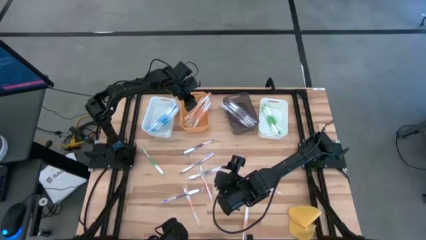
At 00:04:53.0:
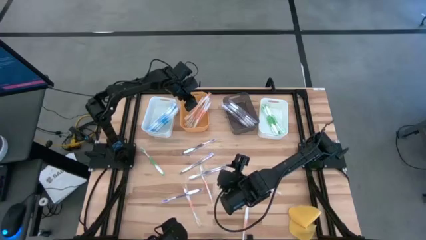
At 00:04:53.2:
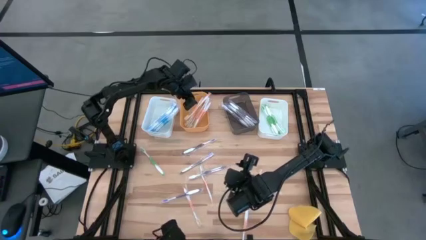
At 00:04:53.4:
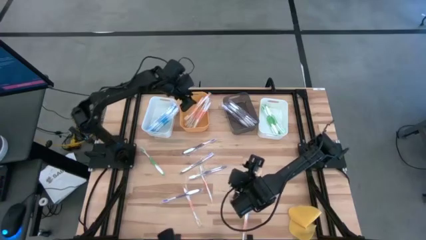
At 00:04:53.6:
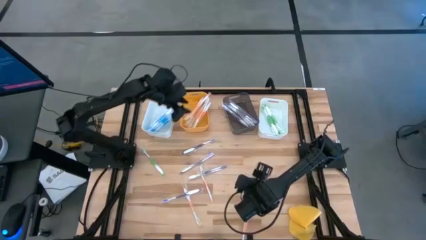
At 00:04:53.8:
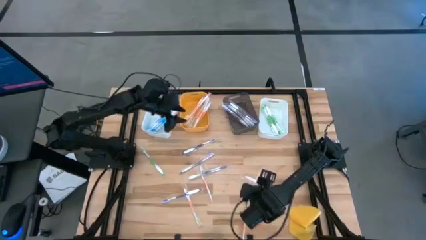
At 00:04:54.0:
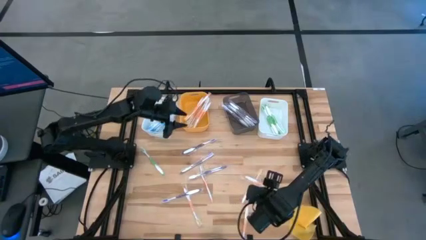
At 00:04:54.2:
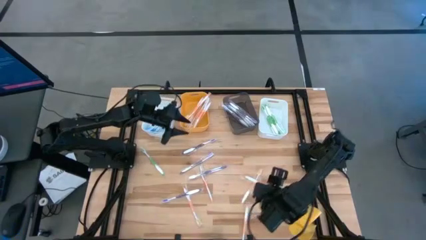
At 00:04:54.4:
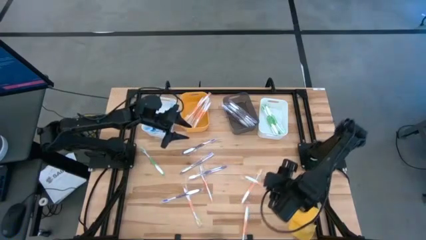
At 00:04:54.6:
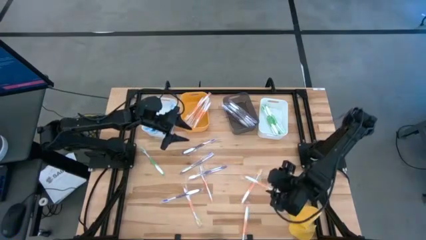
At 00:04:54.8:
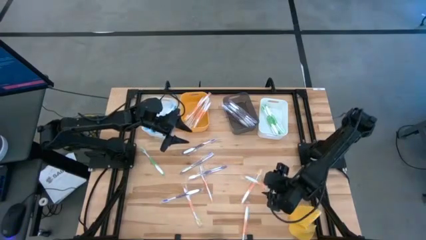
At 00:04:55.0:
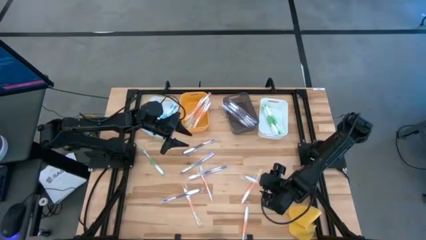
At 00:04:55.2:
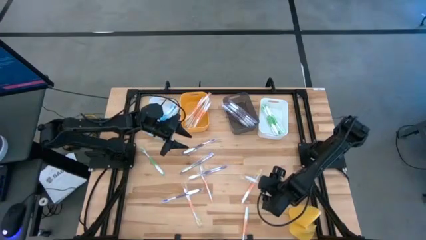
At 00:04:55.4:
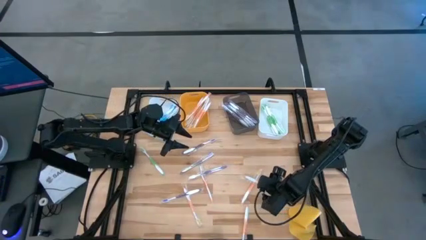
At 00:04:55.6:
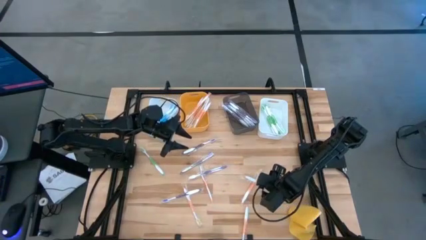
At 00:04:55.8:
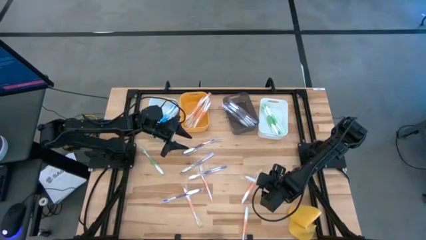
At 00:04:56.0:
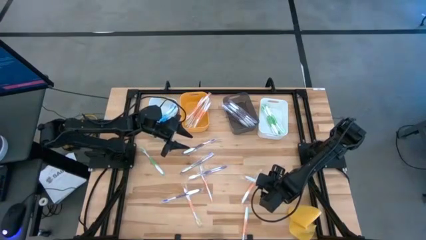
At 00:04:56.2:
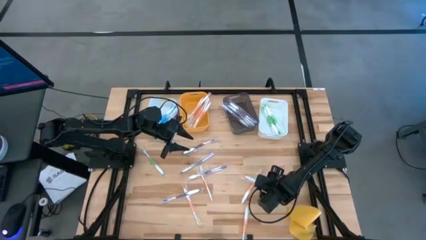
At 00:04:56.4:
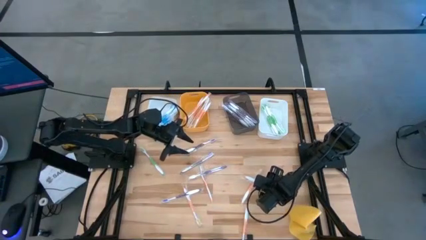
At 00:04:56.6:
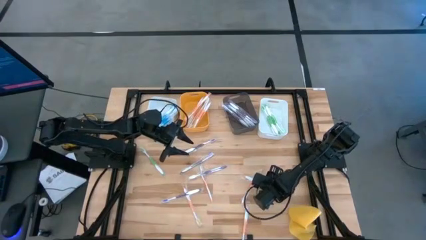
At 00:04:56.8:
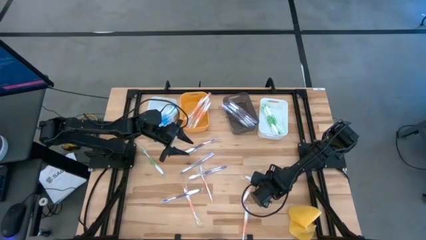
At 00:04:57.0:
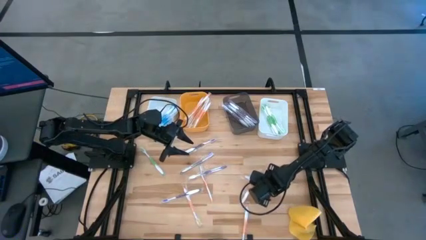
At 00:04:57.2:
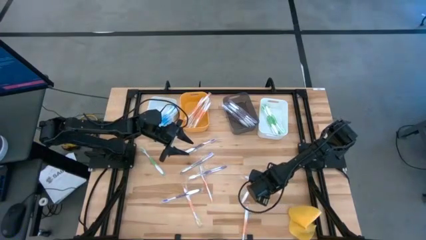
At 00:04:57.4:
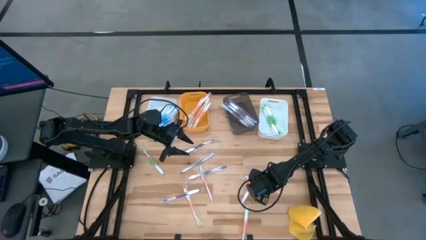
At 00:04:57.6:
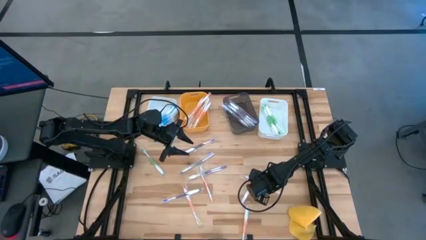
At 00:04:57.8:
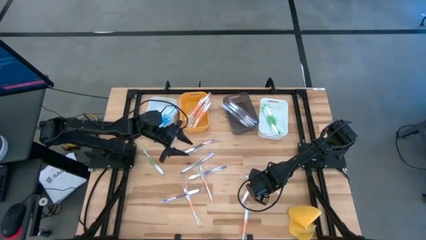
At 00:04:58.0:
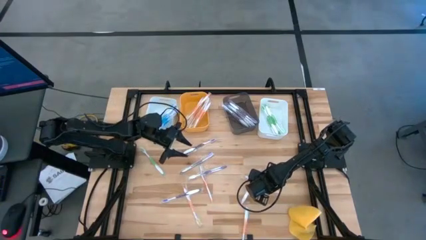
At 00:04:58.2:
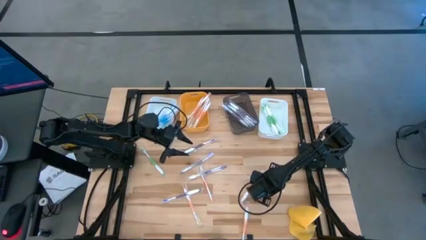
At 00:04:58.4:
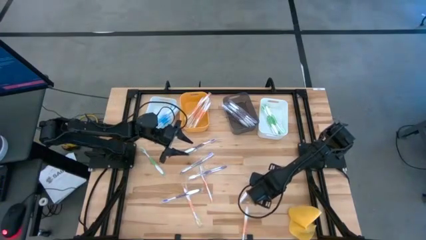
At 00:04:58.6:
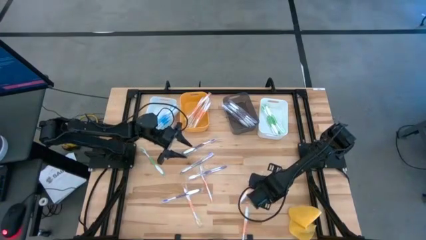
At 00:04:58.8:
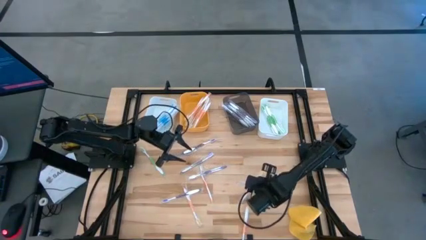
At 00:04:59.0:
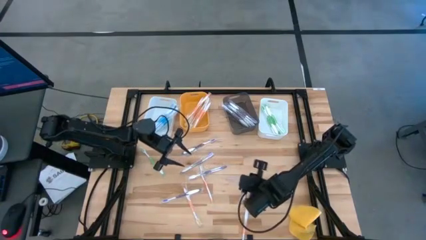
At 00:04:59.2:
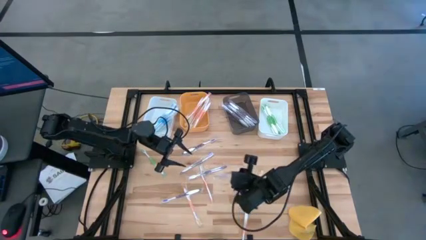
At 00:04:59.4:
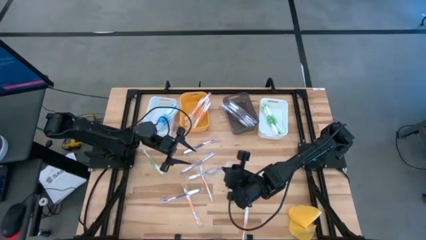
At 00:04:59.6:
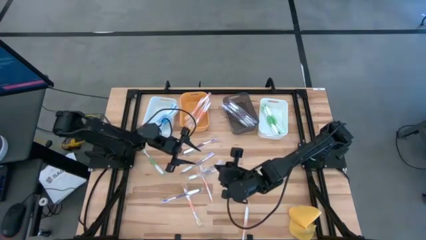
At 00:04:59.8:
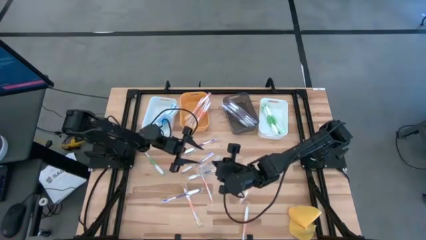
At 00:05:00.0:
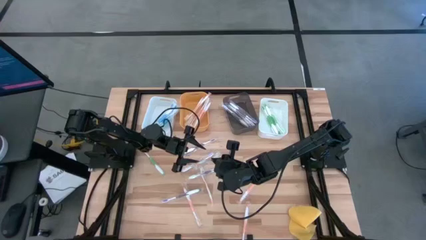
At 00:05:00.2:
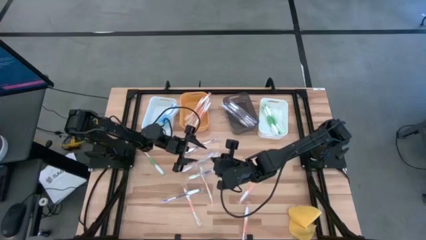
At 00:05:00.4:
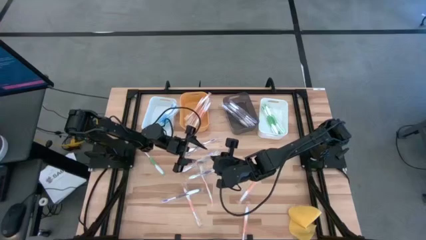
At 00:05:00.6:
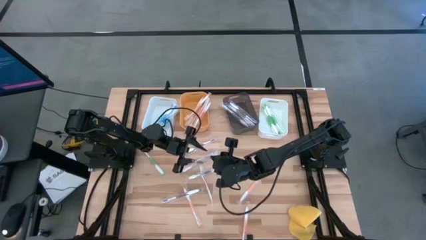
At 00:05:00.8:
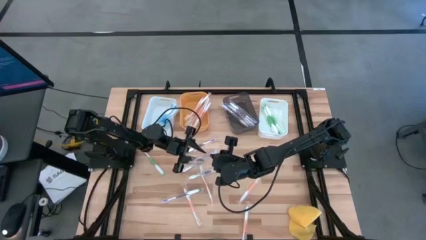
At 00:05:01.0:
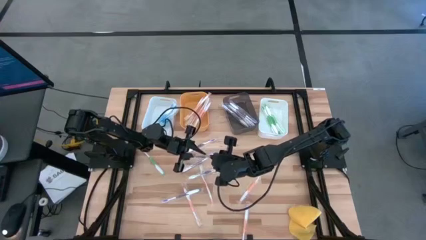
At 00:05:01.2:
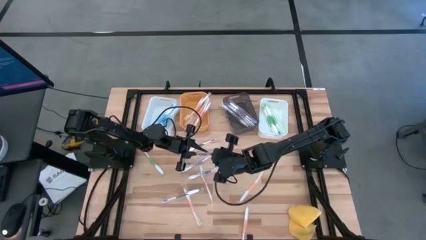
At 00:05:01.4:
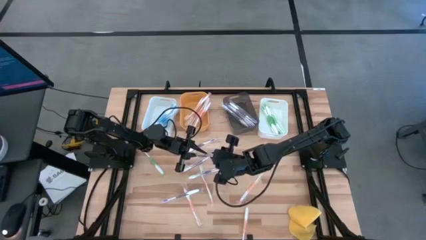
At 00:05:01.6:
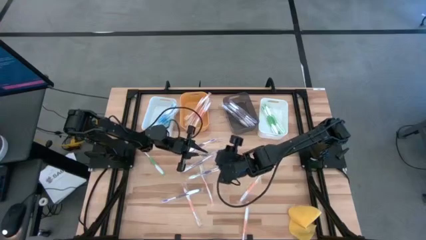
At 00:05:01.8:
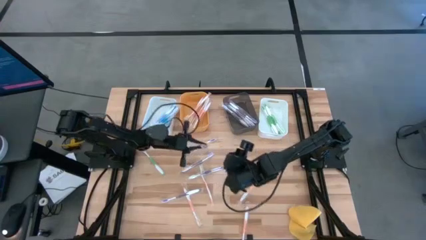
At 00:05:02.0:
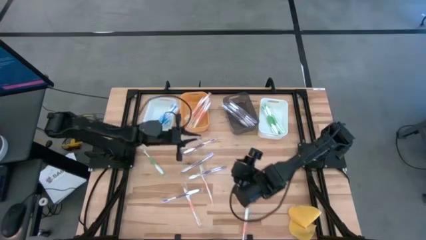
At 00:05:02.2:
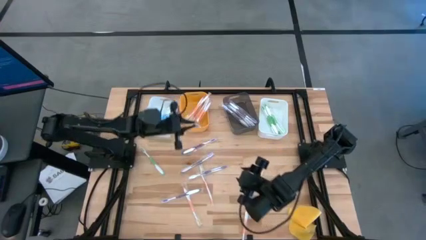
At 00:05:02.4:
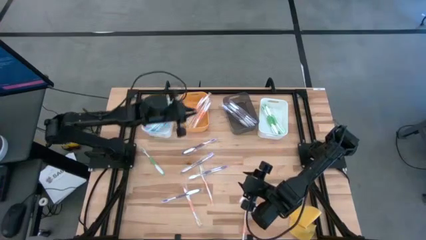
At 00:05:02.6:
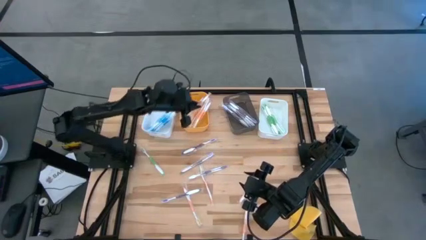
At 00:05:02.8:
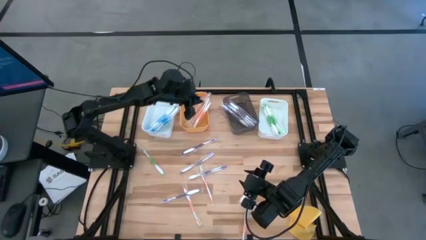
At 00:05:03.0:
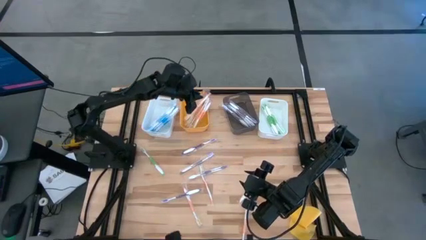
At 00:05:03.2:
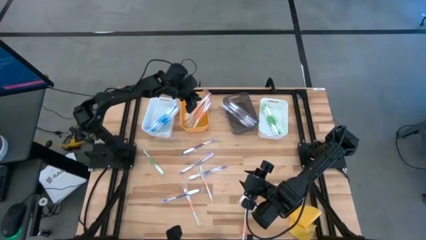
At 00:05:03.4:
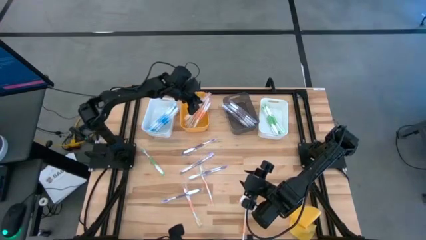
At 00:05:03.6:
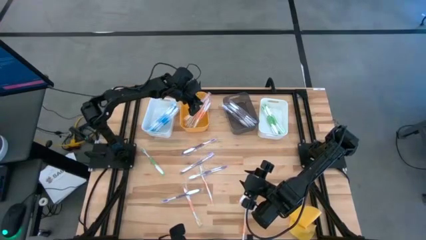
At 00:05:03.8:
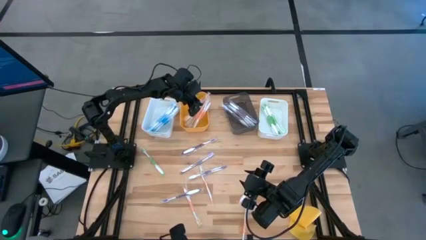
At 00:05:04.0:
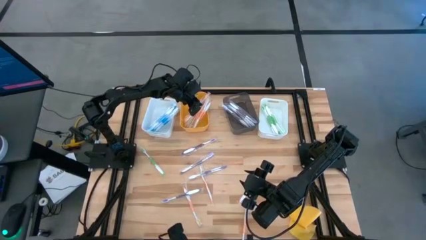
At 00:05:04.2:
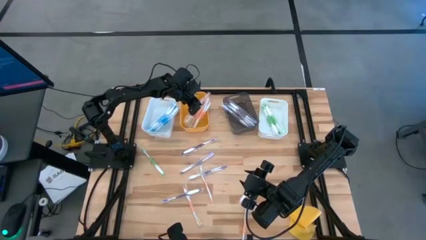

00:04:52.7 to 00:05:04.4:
Task: Pick & Place Toothbrushes
Put the orange toothbrush into the yellow bin

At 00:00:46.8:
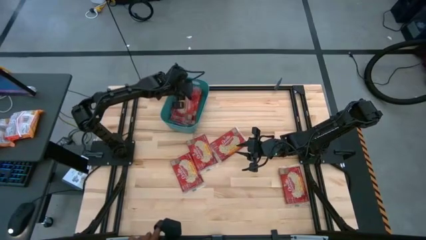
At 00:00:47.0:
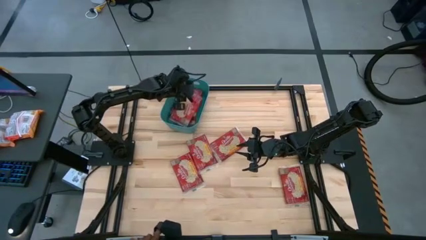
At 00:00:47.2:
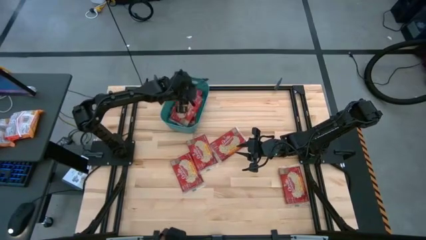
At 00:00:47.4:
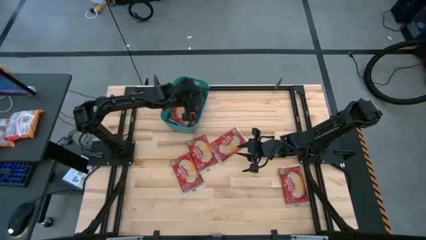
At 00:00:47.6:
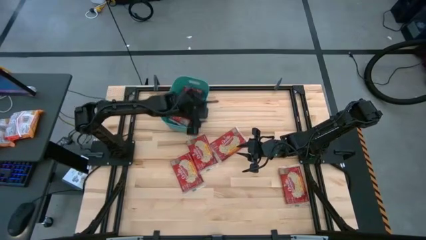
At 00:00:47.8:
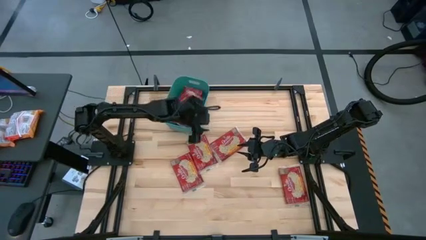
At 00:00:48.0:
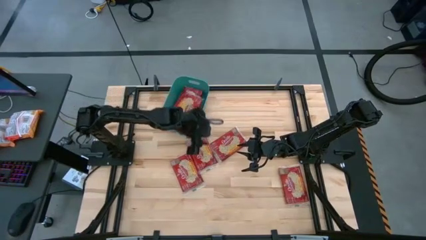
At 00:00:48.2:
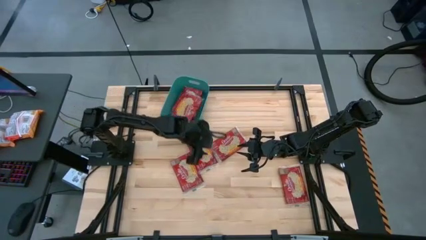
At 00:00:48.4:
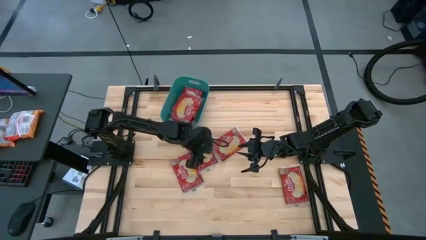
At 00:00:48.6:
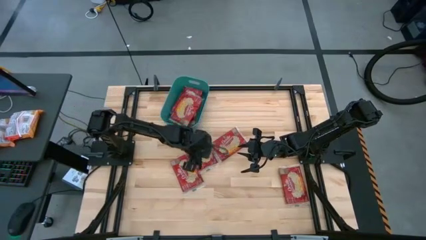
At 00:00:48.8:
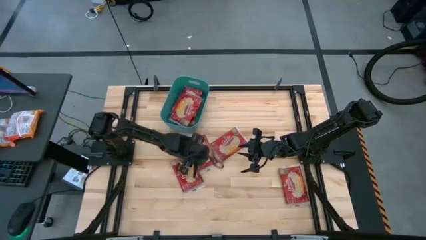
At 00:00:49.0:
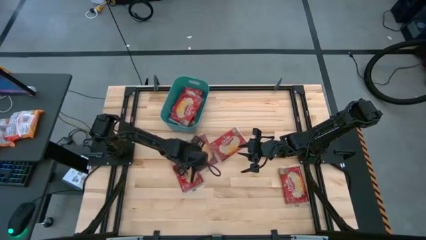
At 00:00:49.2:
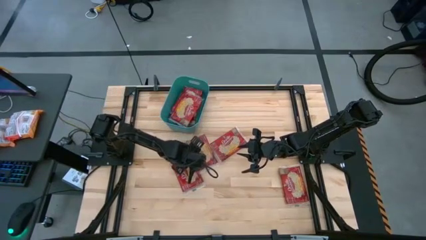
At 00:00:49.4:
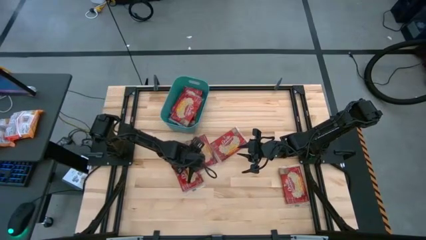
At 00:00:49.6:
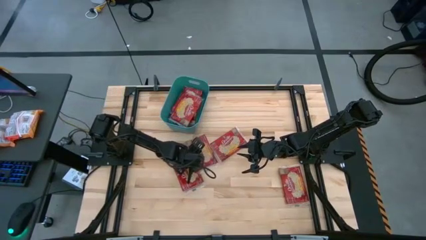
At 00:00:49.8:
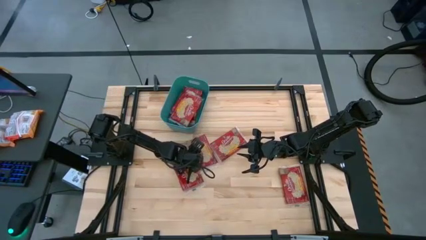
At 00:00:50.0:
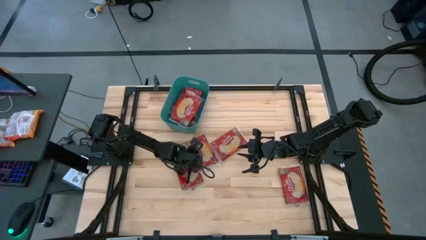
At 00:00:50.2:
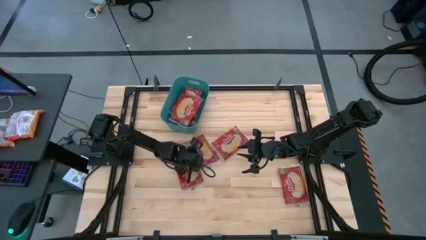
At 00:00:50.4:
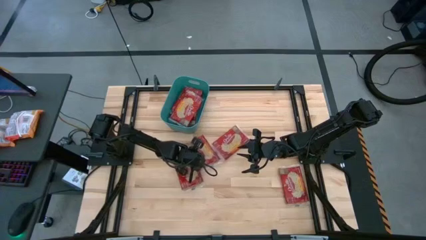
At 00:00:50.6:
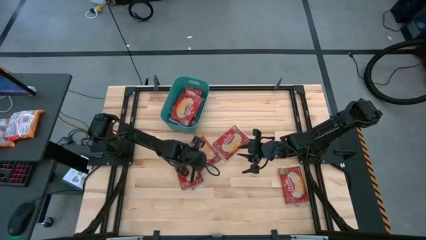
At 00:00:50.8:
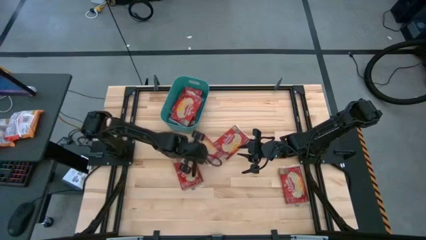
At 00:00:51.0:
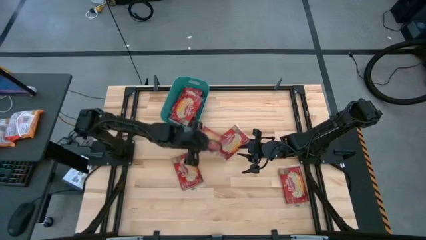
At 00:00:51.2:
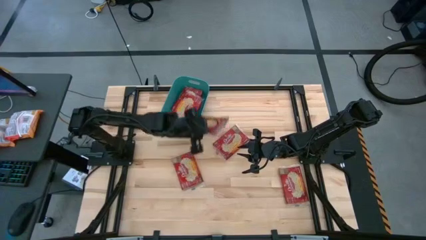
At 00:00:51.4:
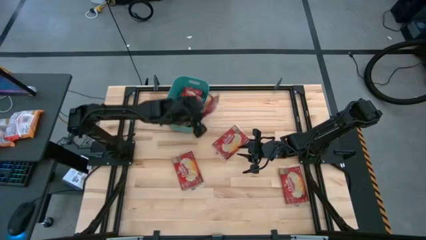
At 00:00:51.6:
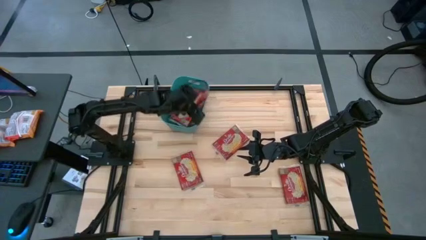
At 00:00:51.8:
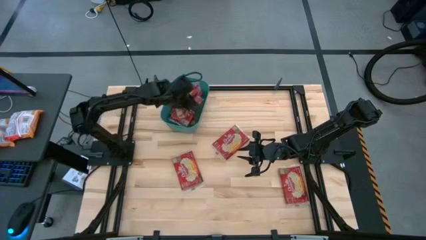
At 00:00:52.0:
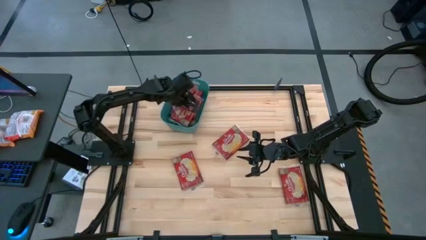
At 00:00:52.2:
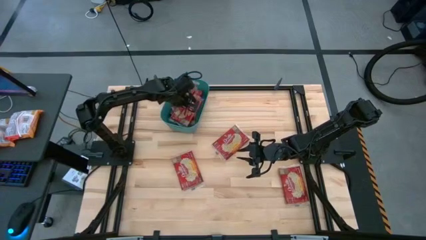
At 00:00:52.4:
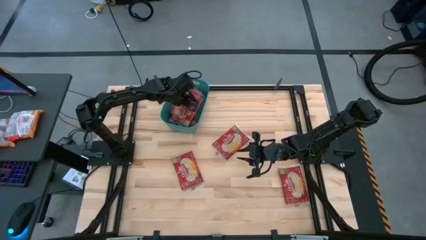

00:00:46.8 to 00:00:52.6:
Task: Sort popcorn bags into baskets
Put the red popcorn bag into the green bin
